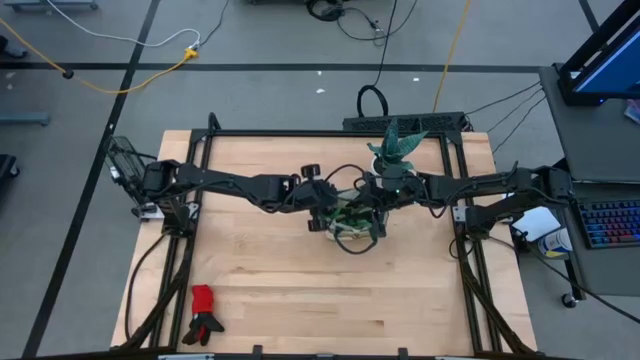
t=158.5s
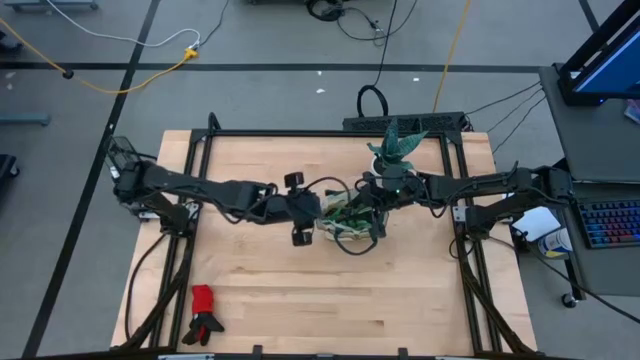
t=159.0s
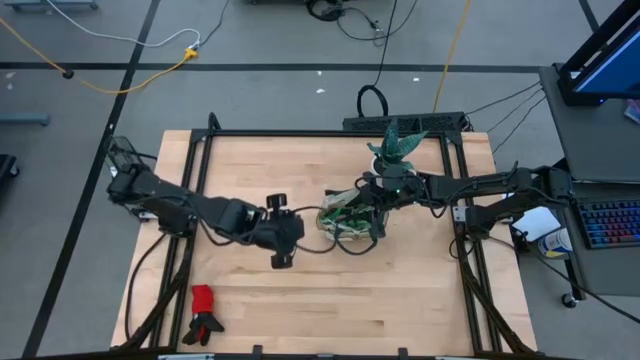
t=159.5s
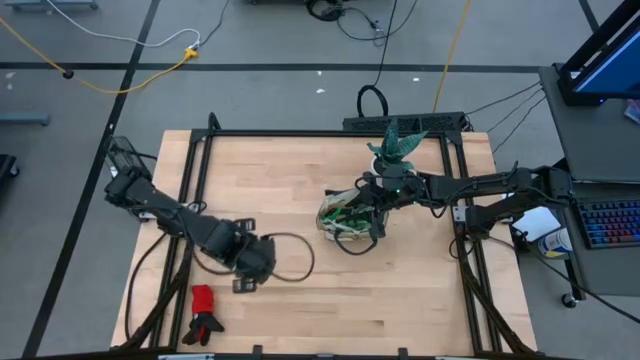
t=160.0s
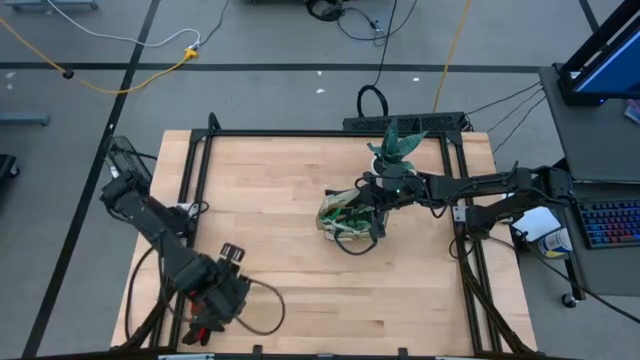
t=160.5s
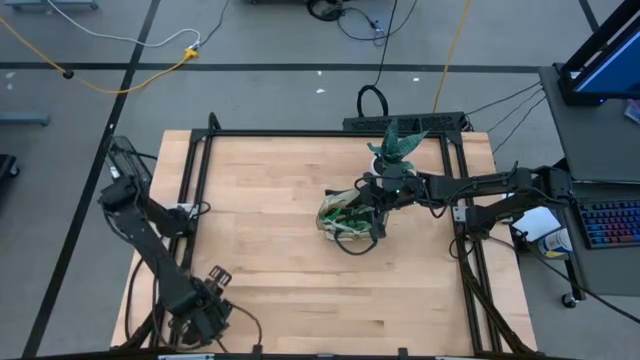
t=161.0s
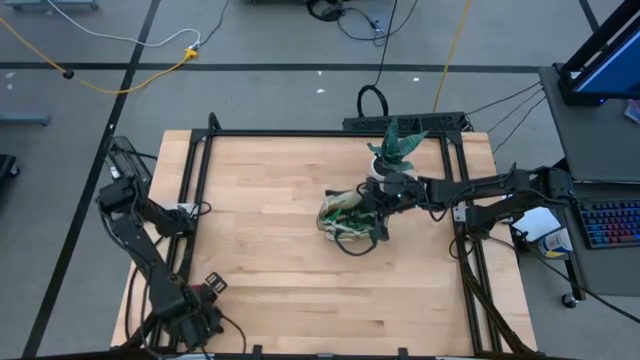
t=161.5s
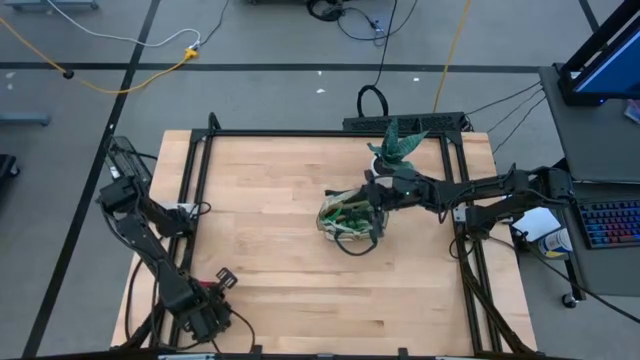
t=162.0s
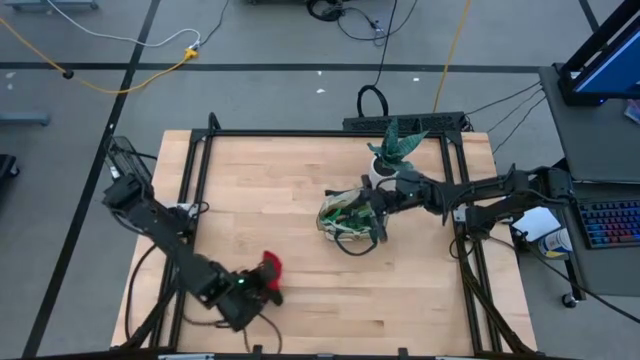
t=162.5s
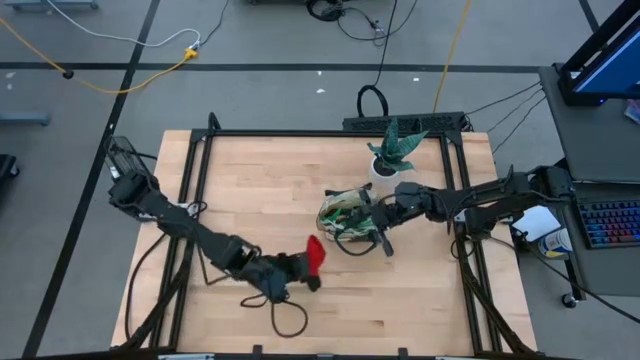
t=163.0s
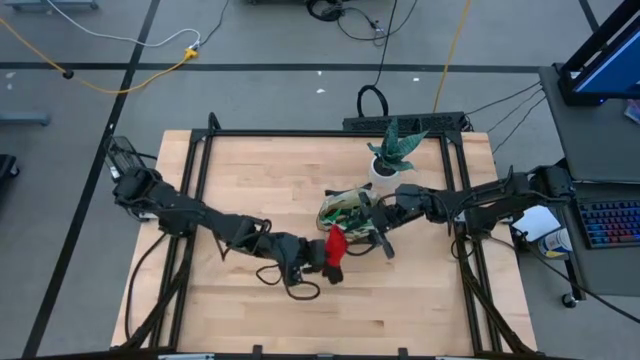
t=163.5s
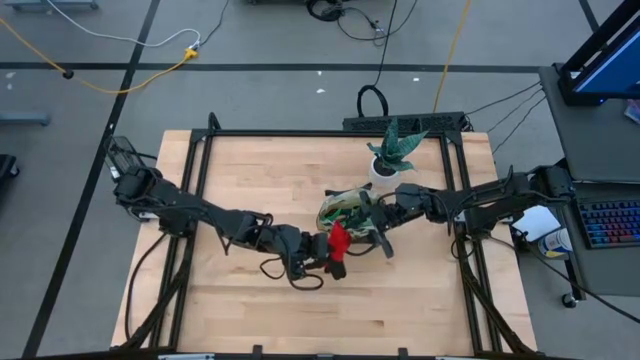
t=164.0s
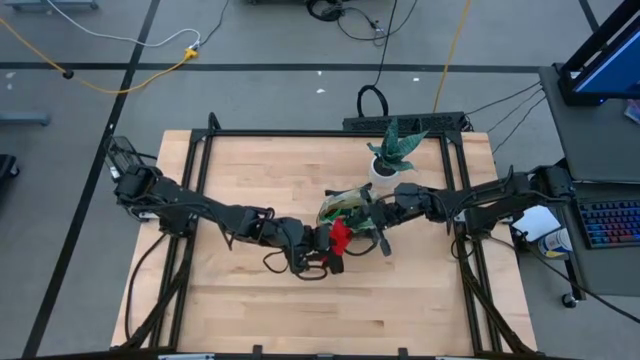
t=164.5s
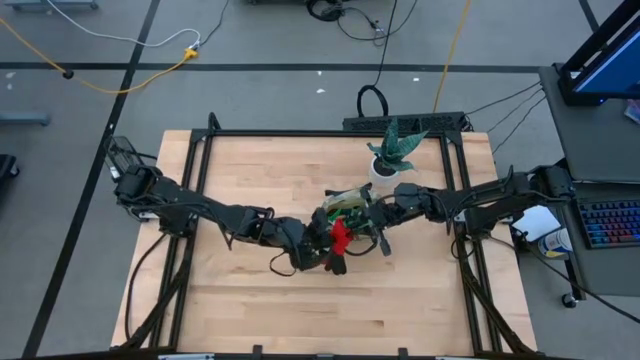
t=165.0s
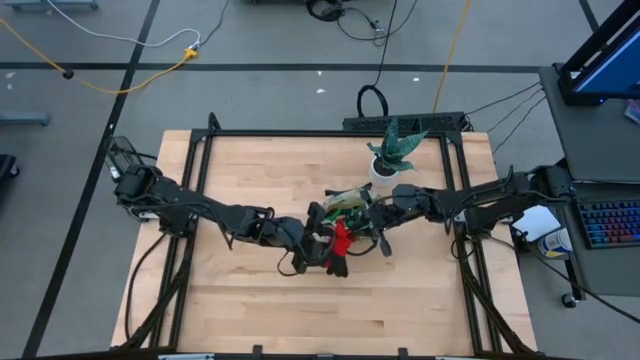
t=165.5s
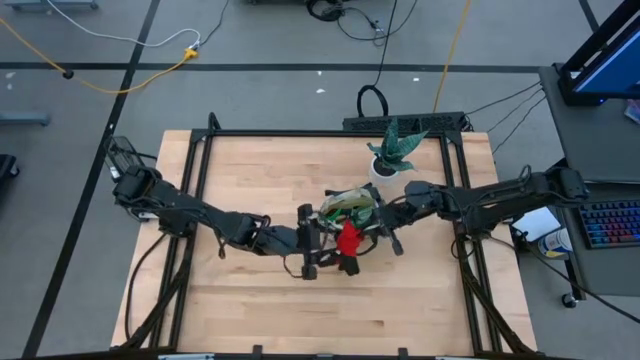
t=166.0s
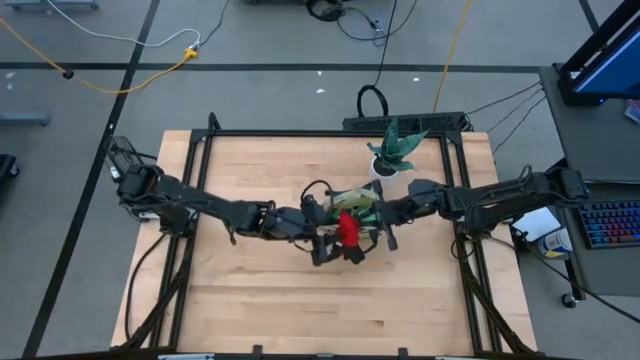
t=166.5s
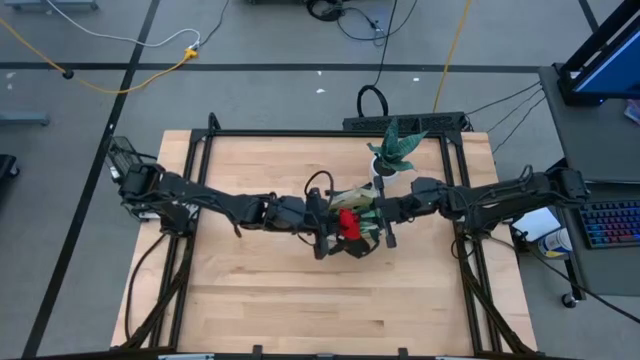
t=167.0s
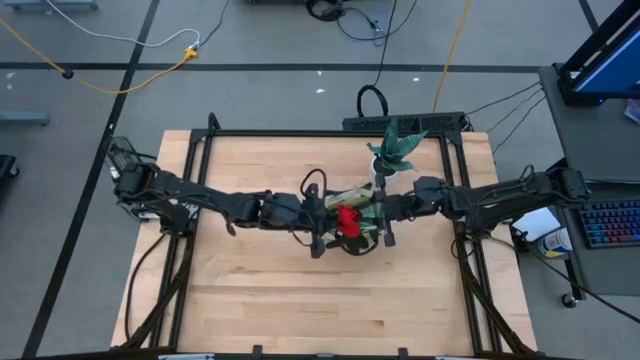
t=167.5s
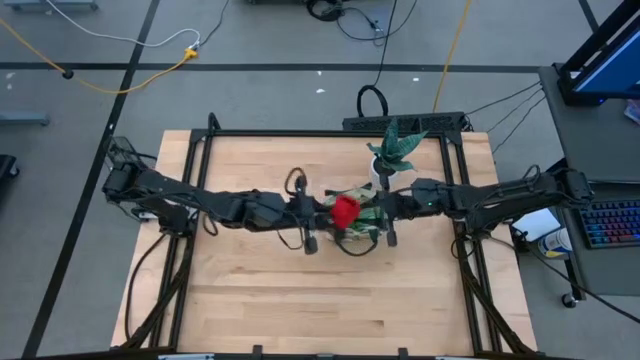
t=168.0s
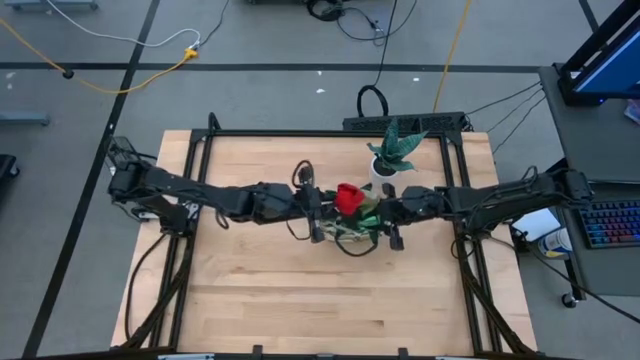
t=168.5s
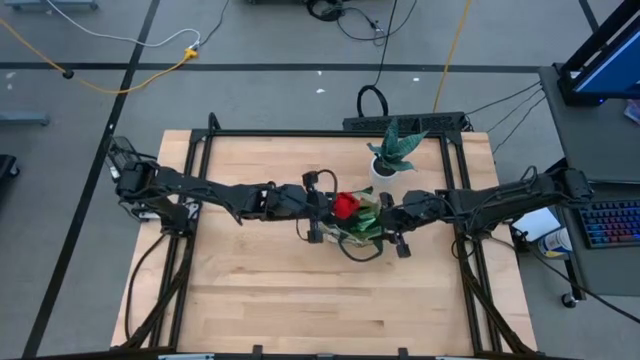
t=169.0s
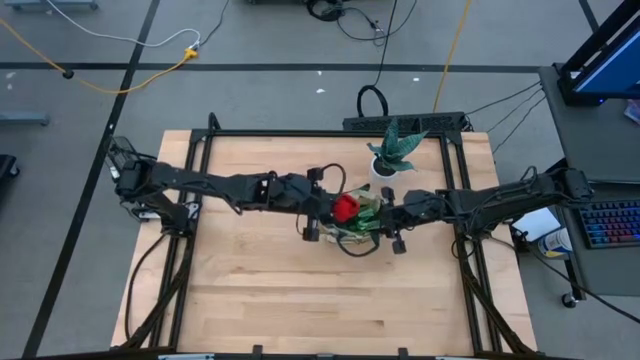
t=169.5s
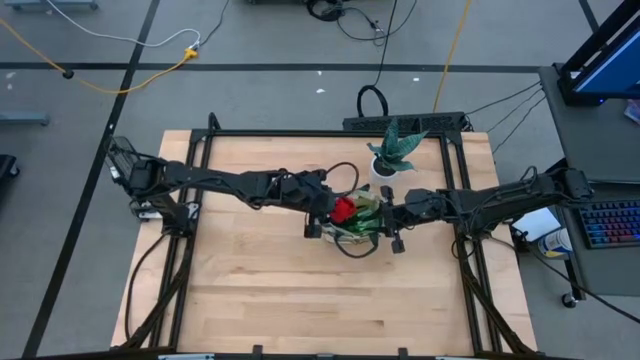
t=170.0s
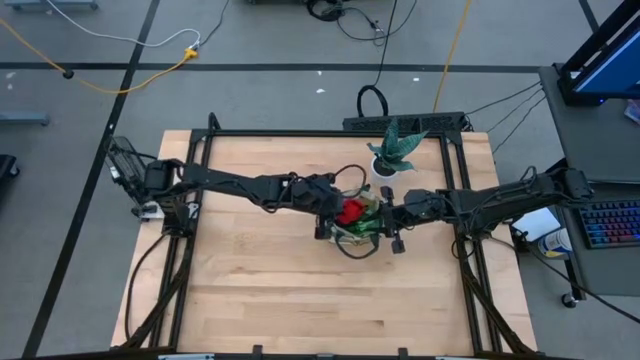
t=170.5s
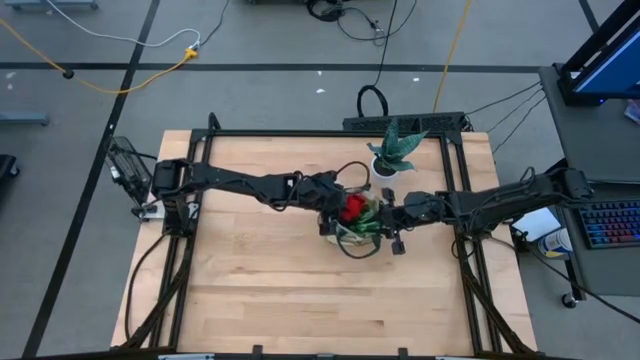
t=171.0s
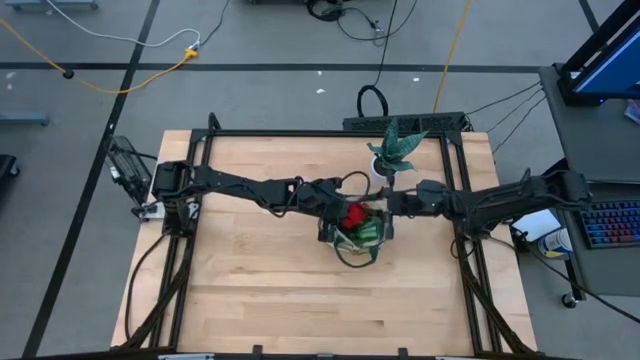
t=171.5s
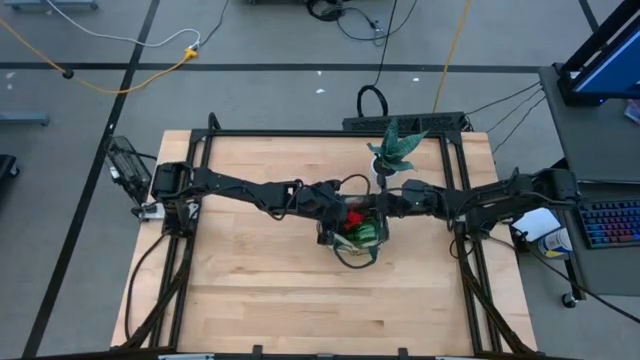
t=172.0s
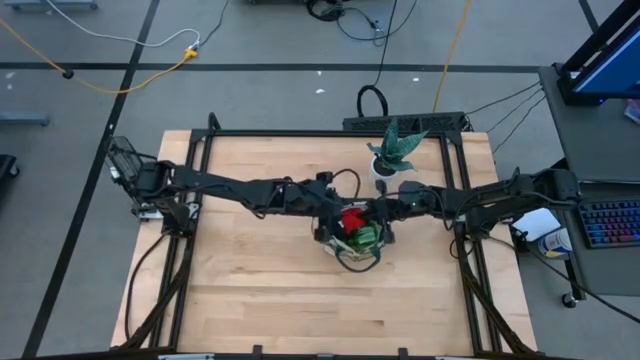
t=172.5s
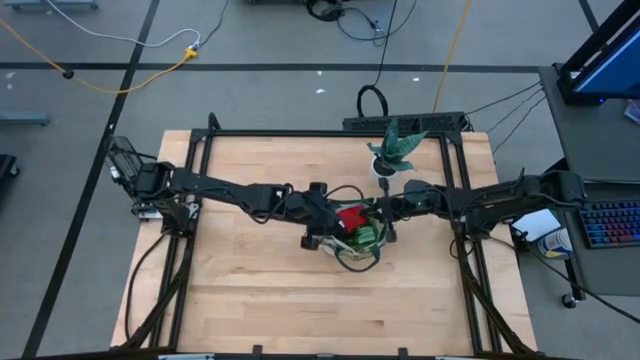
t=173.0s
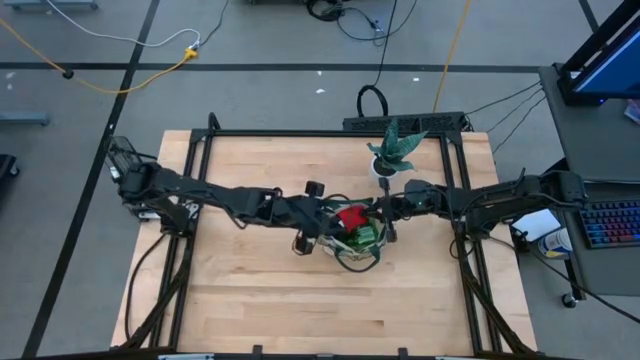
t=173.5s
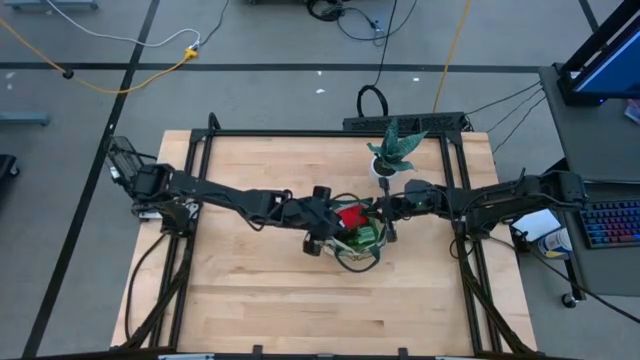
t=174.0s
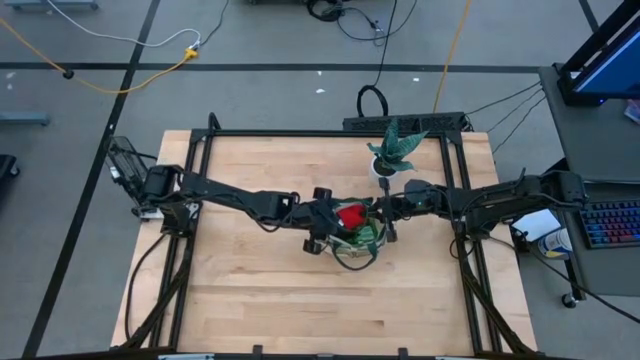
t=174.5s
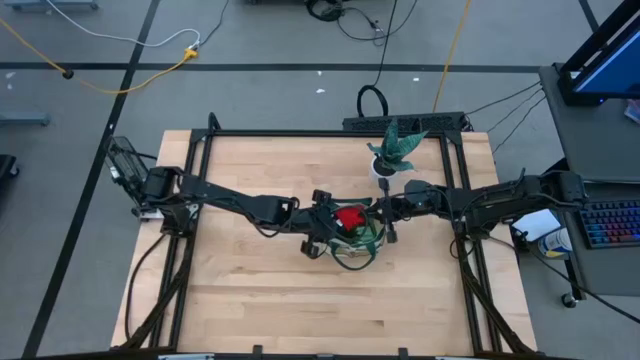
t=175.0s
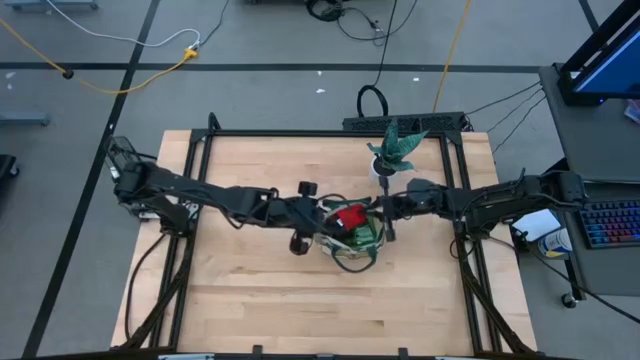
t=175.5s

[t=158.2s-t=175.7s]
Task: Pick & Place Garden tools in Gardening bag
Put the red gloves into the gardening bag

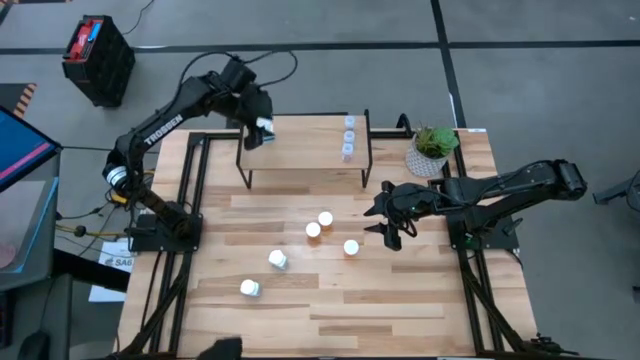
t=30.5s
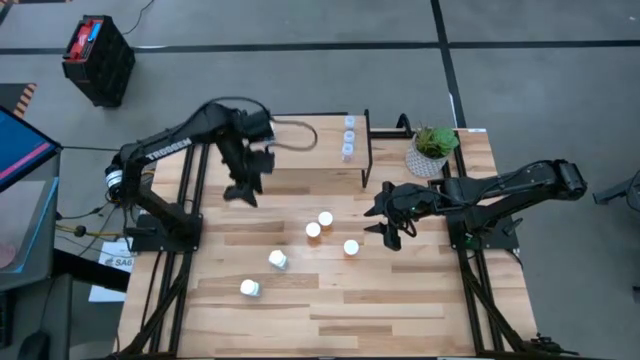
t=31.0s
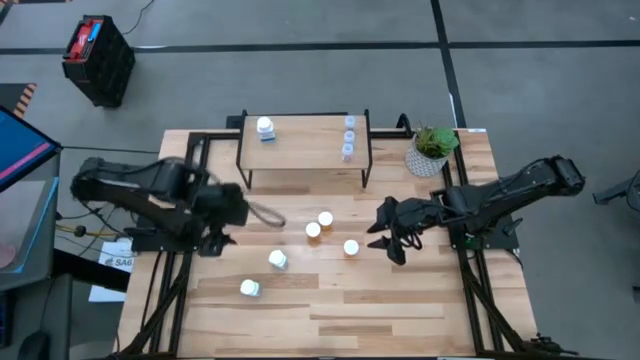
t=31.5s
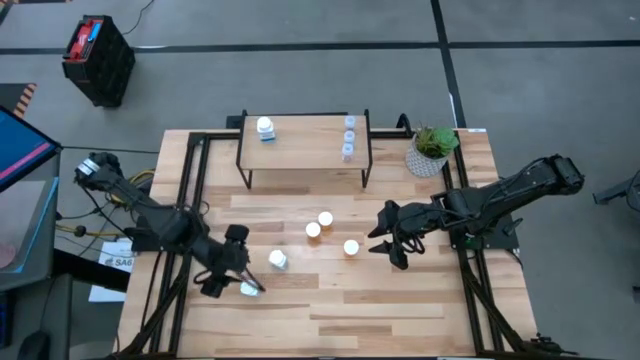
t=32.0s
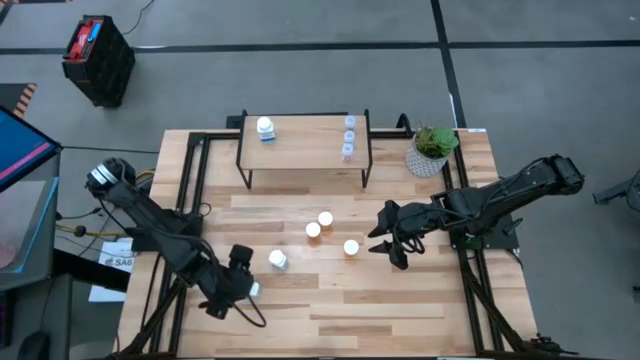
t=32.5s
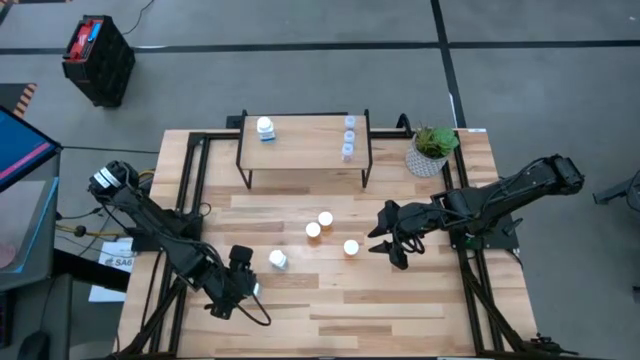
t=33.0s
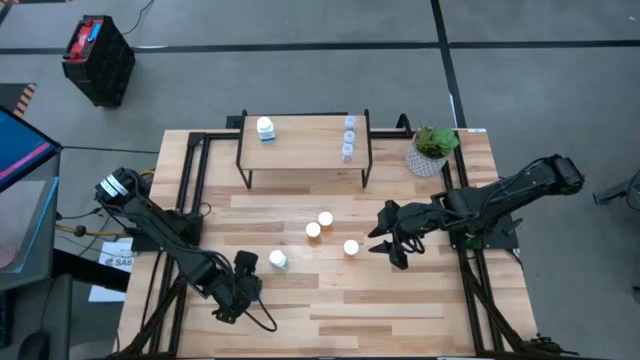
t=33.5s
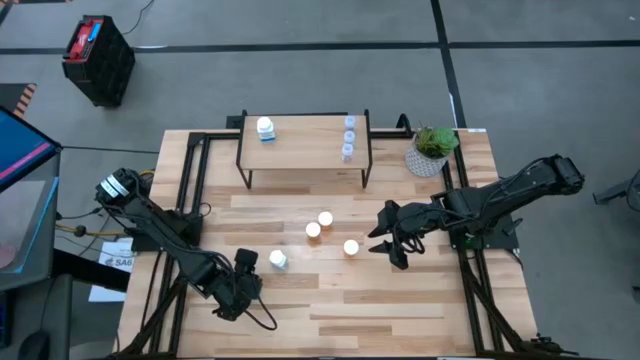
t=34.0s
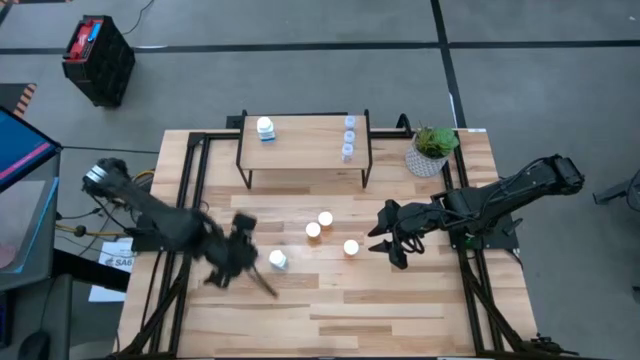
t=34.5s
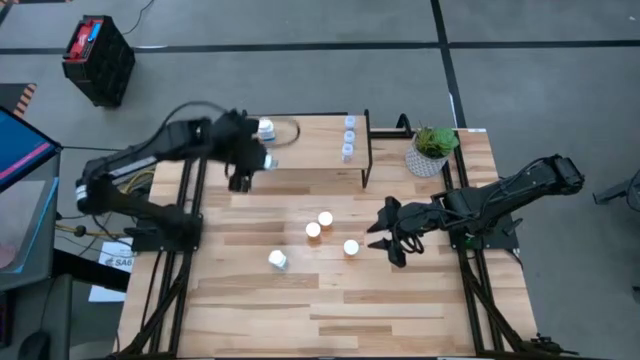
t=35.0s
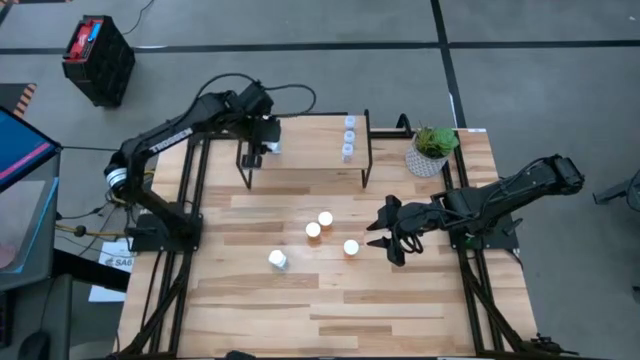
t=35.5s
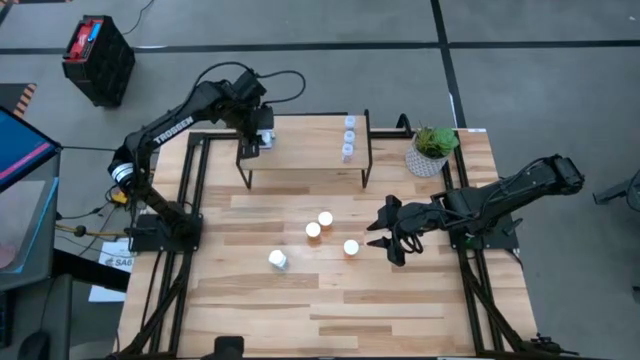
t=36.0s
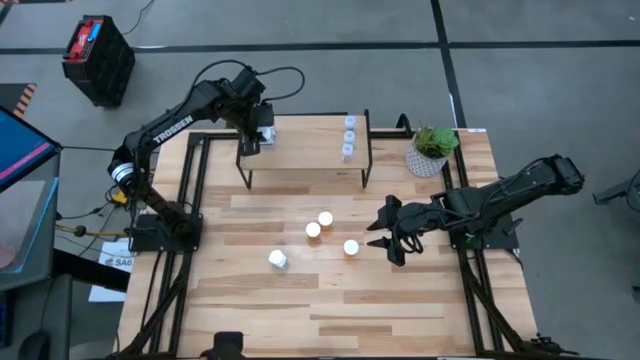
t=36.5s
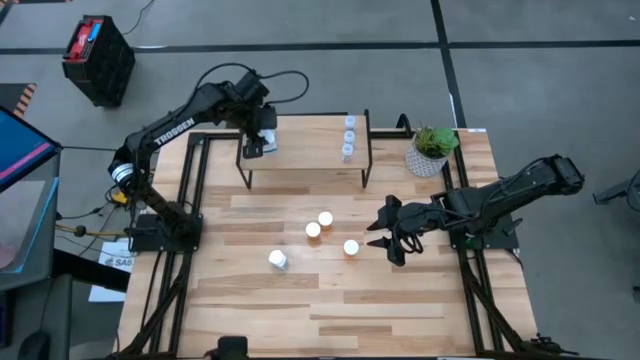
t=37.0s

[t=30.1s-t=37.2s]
Task: Pick and place medicine bottles onto shelf by color
Put the bottom white pill bottle on the shelf aligned with the other white pill bottle
